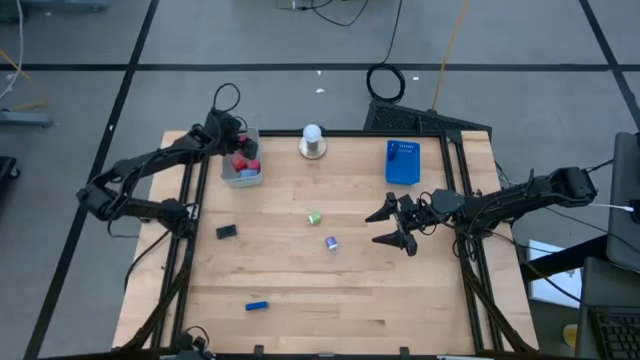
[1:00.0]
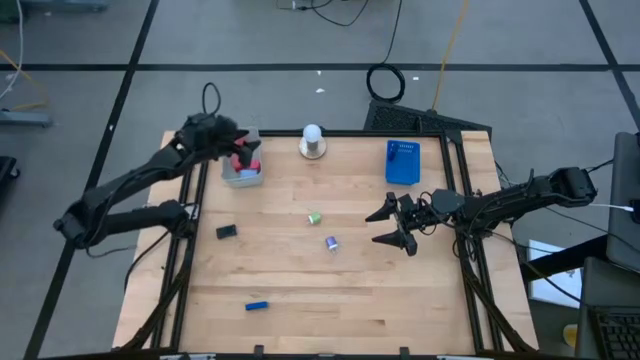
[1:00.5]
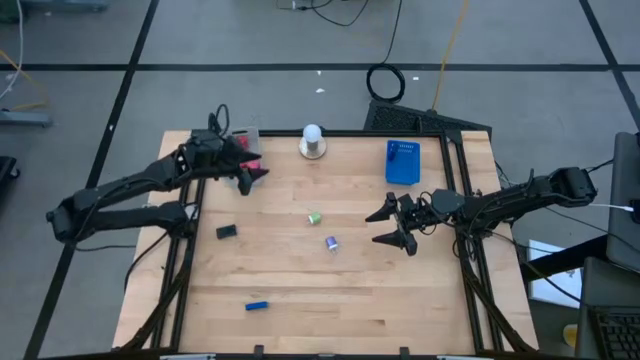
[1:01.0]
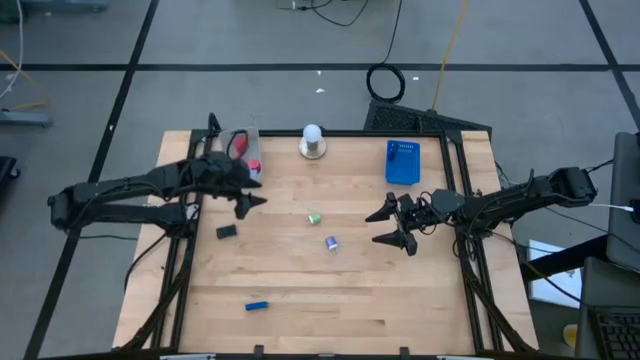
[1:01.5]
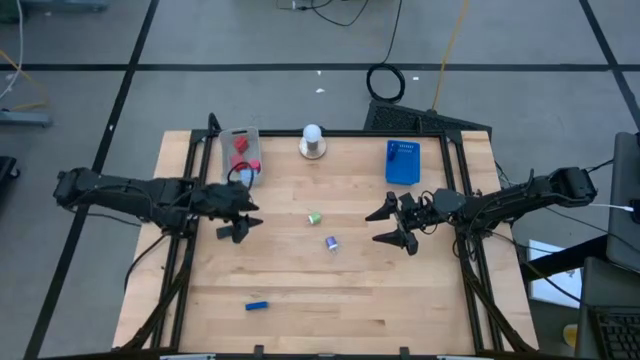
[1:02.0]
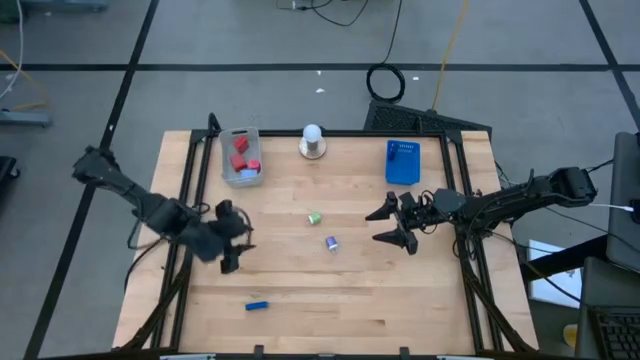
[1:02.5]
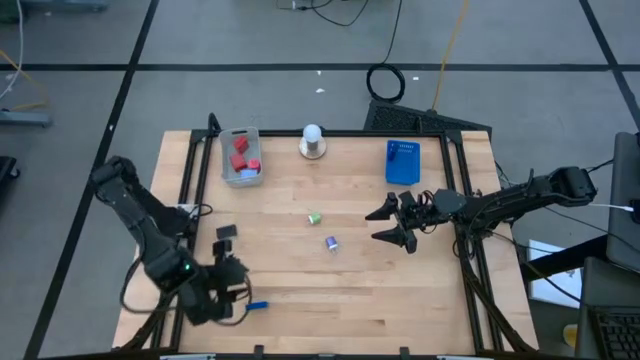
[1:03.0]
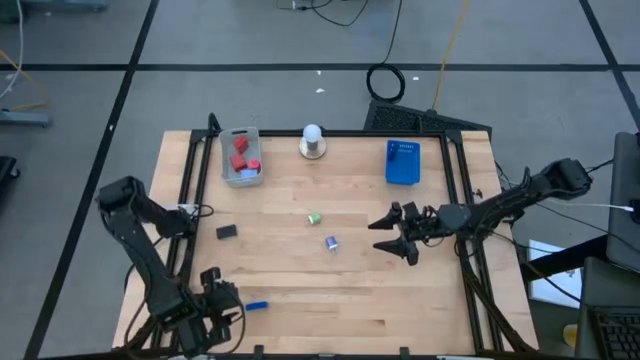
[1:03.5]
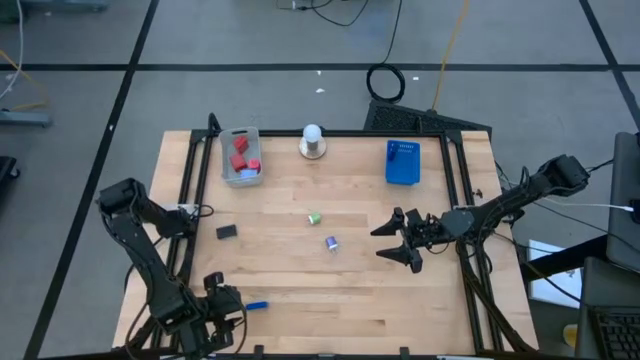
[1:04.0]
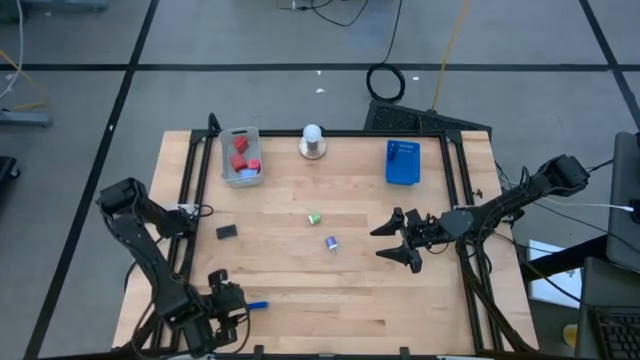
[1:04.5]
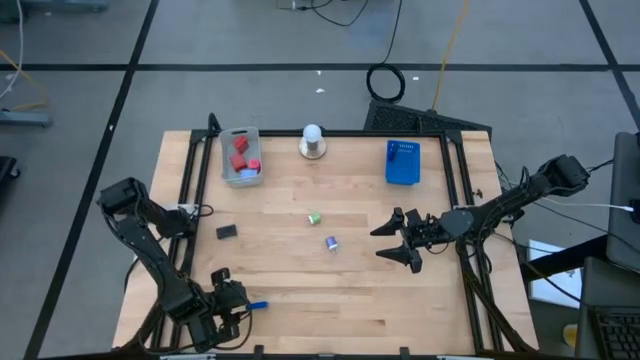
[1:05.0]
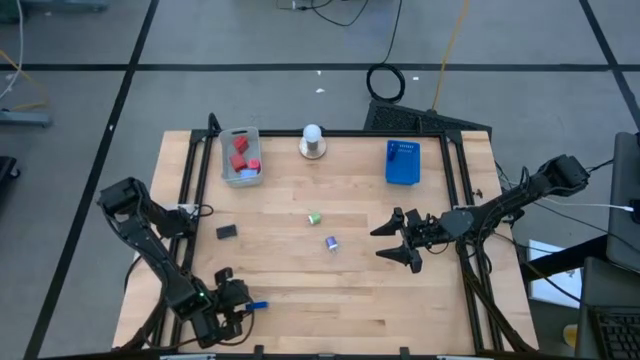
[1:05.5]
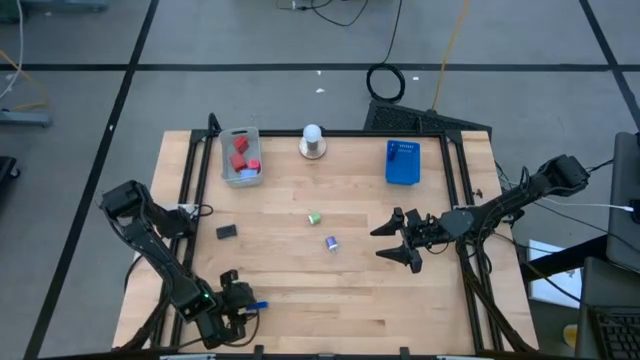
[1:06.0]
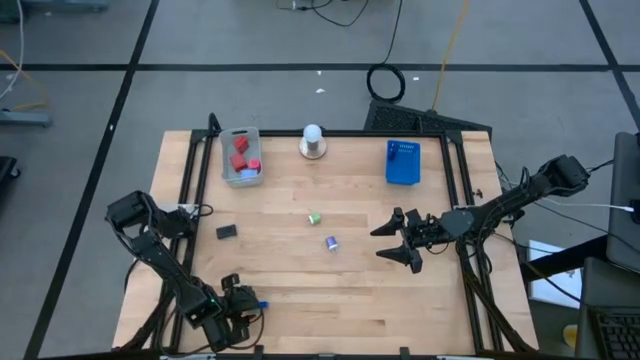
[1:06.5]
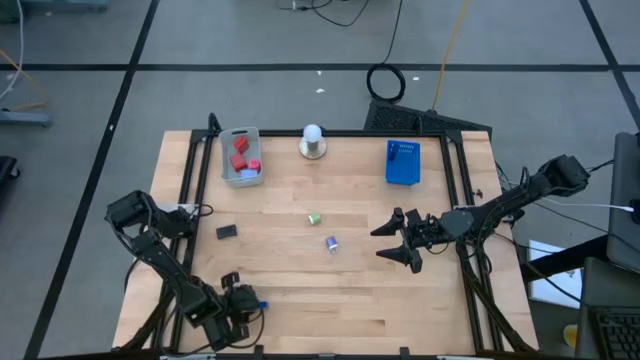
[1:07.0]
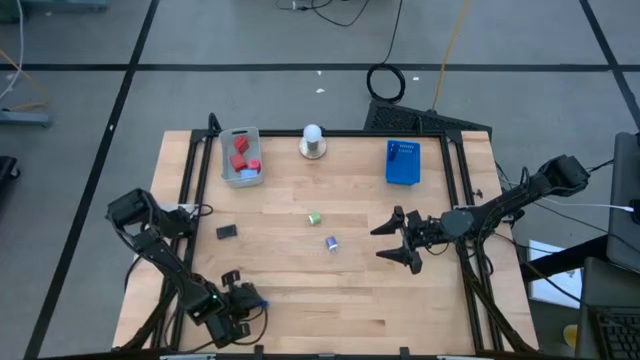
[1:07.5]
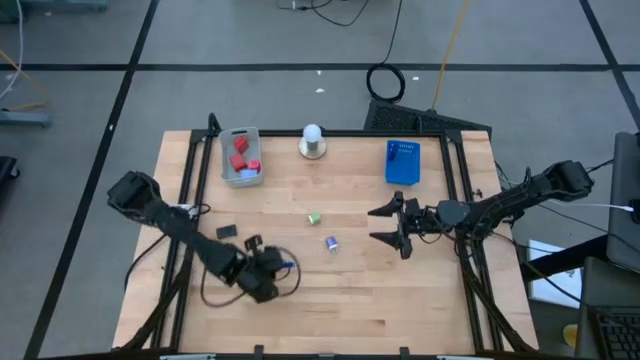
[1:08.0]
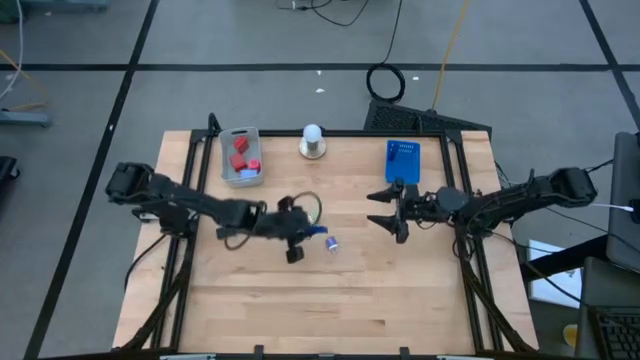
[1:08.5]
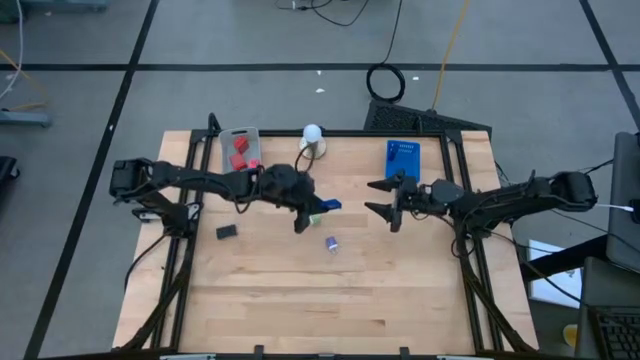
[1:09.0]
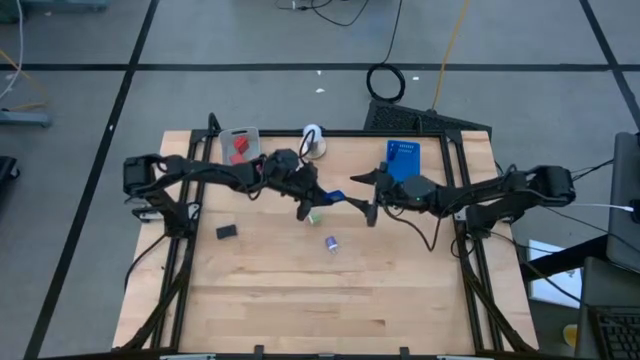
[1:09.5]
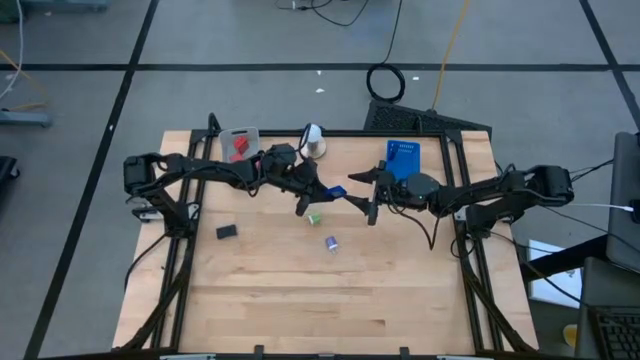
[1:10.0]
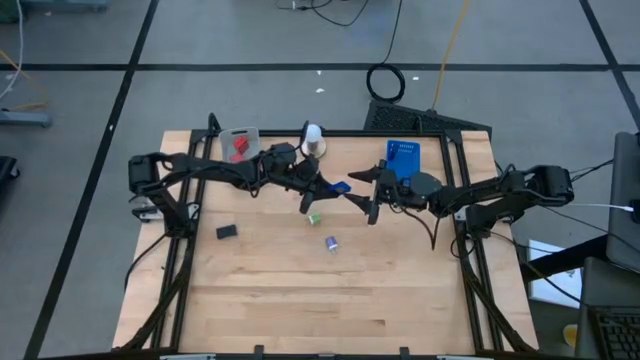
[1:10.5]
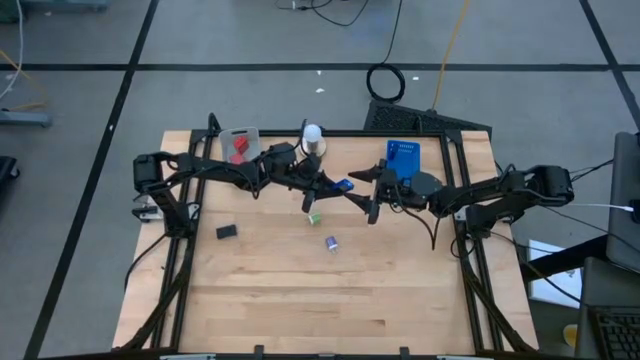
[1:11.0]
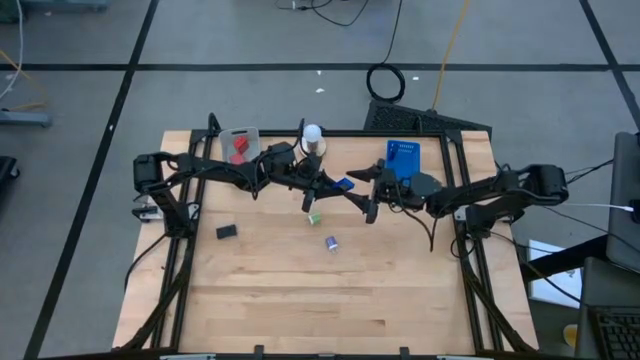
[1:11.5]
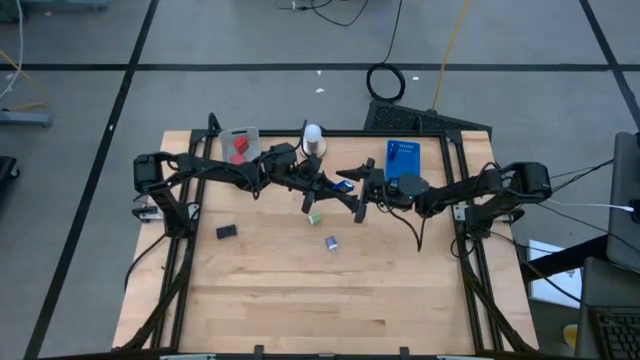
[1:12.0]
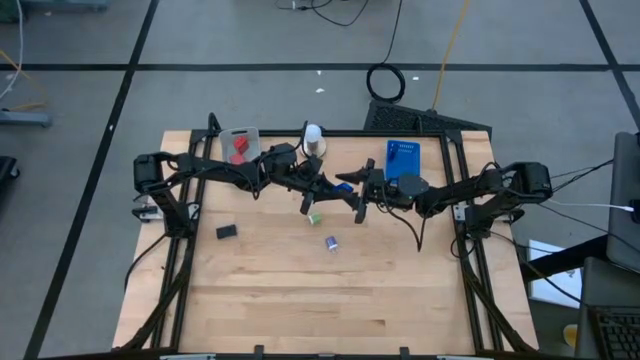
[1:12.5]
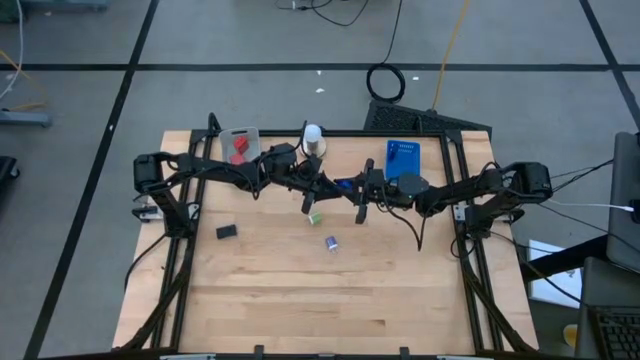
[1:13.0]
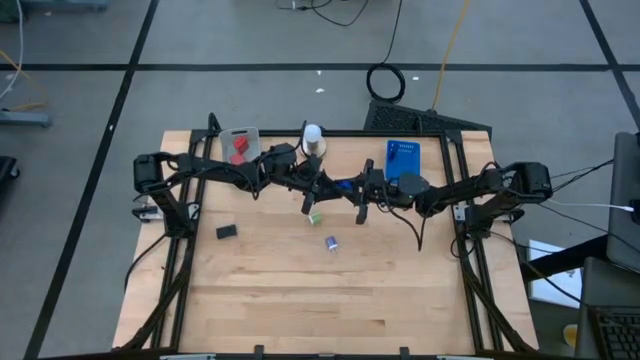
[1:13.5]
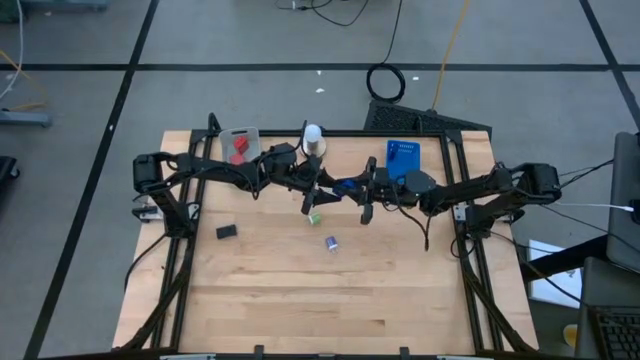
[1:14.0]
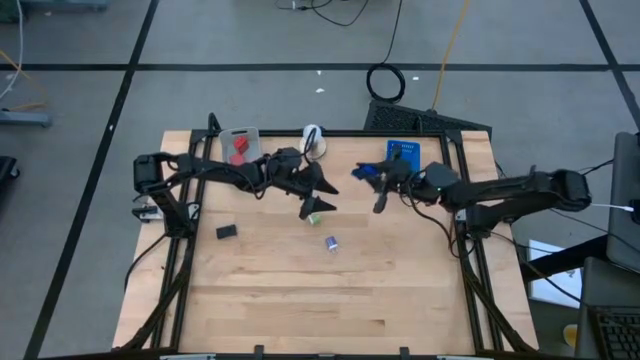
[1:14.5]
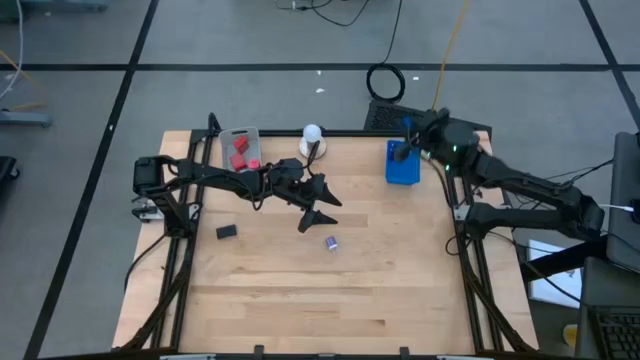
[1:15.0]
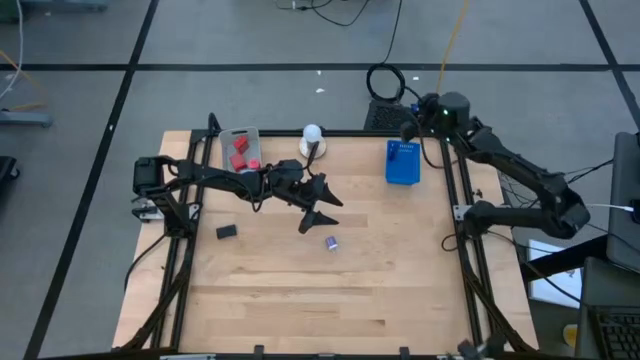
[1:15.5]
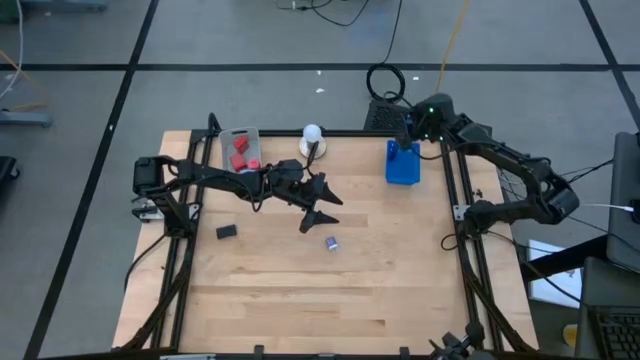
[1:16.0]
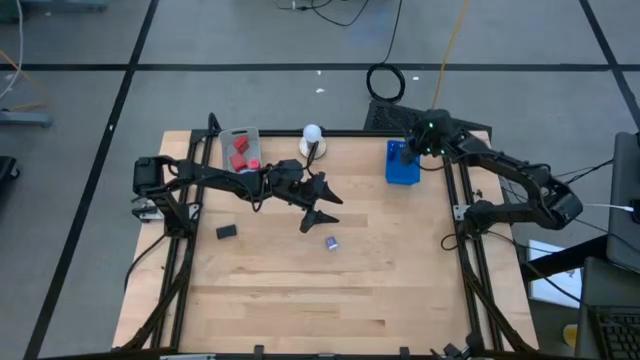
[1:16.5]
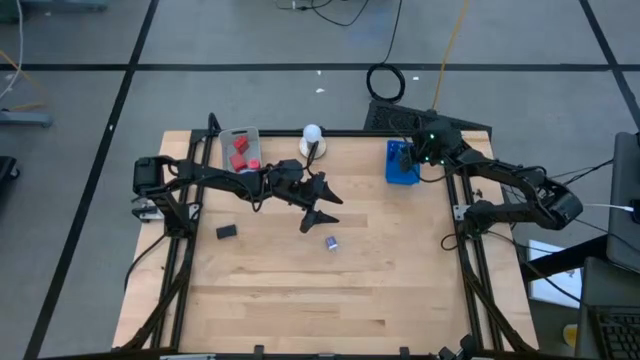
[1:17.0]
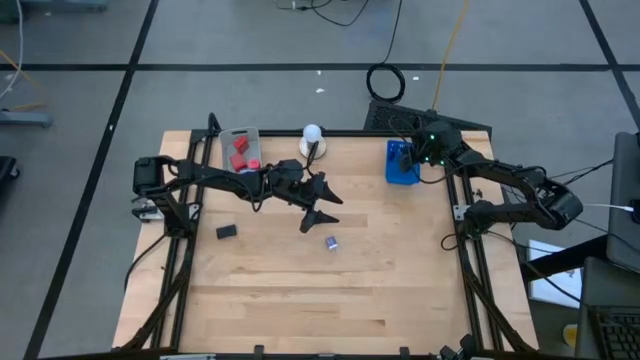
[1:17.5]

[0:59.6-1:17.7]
Task: Pick & Place Office items
Put the blue digital clock into the blue bin
